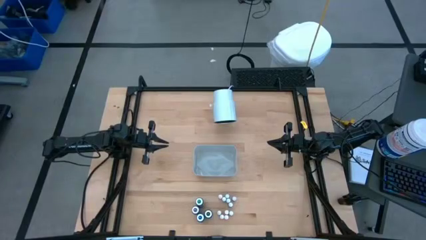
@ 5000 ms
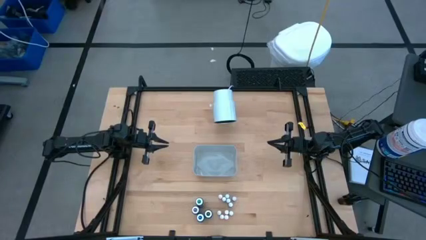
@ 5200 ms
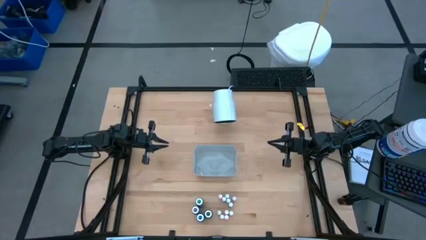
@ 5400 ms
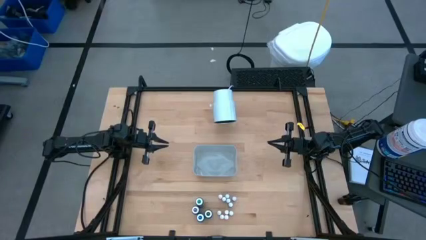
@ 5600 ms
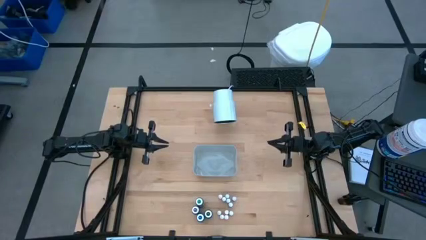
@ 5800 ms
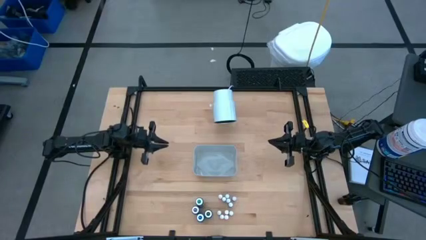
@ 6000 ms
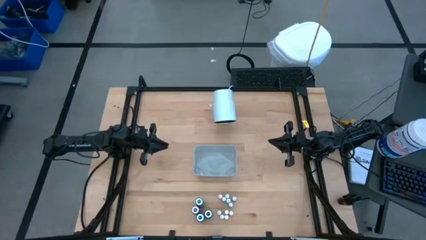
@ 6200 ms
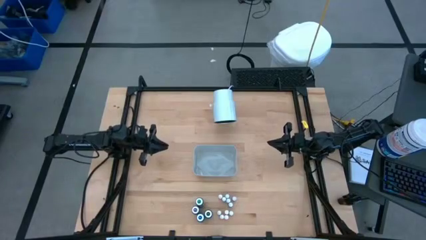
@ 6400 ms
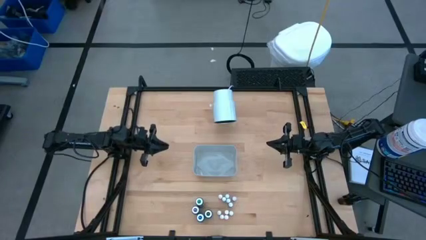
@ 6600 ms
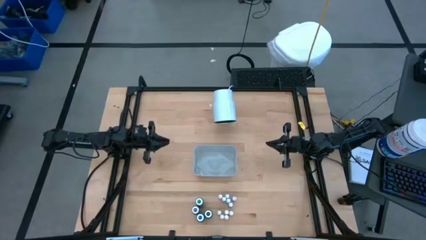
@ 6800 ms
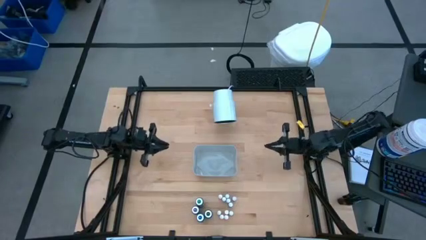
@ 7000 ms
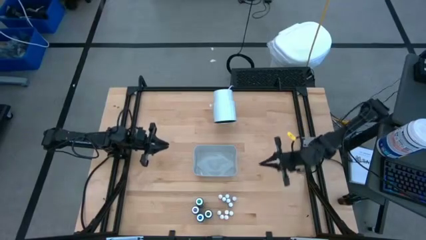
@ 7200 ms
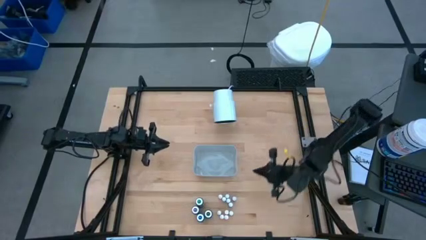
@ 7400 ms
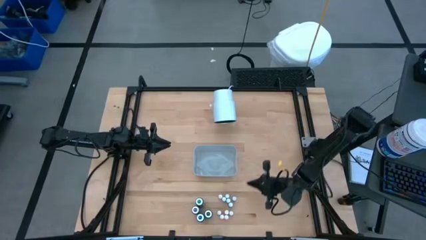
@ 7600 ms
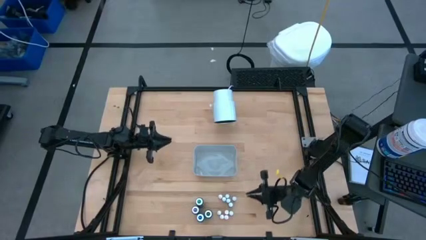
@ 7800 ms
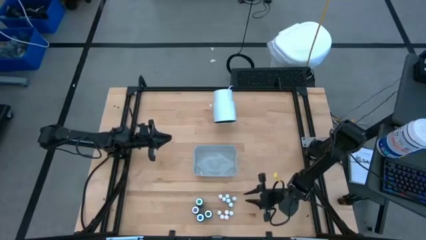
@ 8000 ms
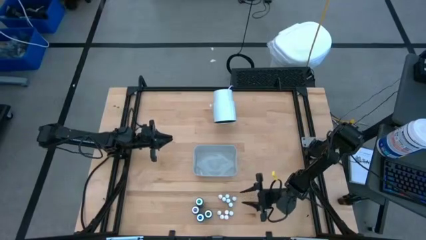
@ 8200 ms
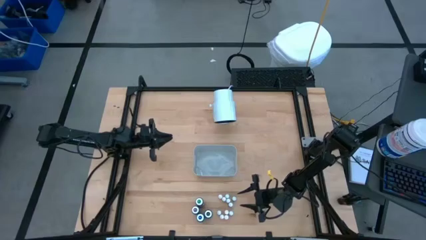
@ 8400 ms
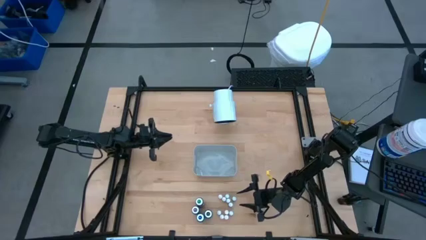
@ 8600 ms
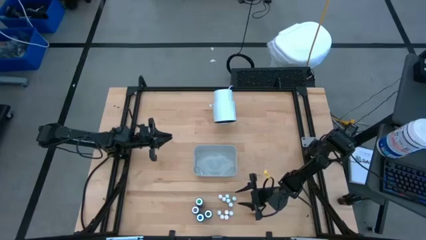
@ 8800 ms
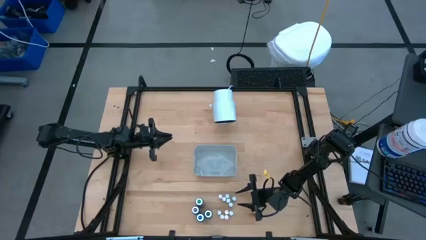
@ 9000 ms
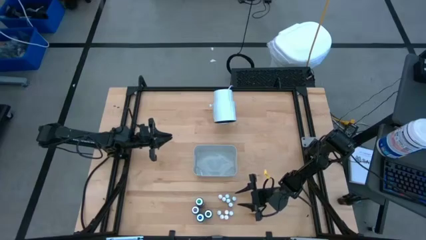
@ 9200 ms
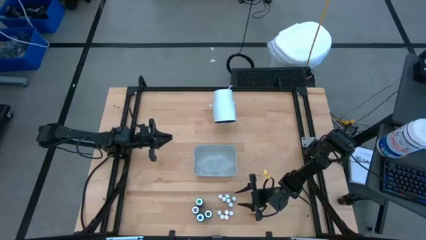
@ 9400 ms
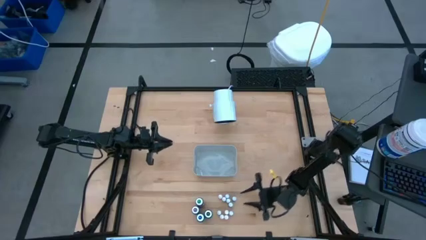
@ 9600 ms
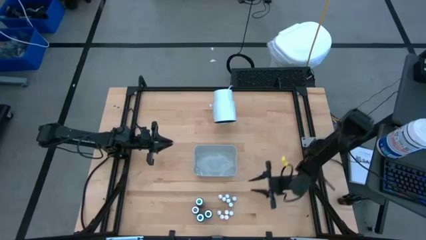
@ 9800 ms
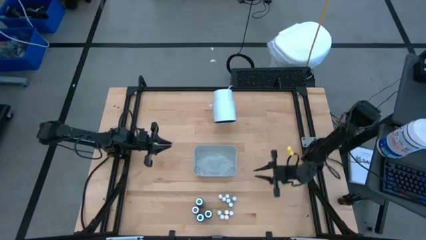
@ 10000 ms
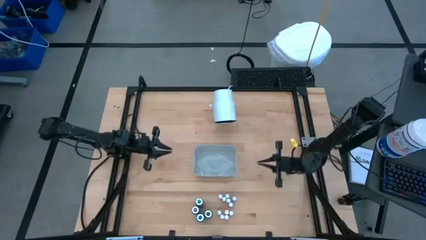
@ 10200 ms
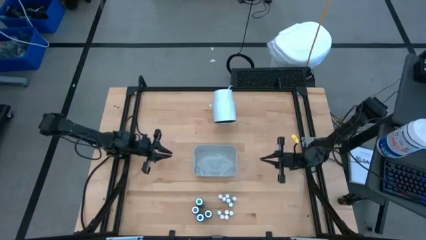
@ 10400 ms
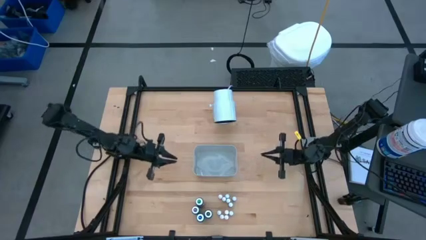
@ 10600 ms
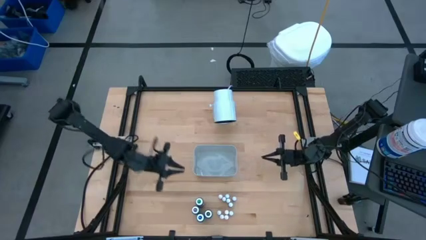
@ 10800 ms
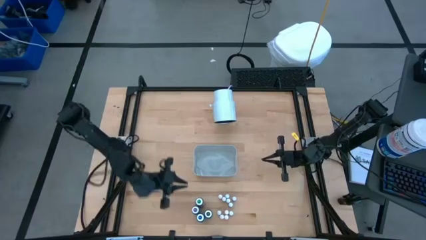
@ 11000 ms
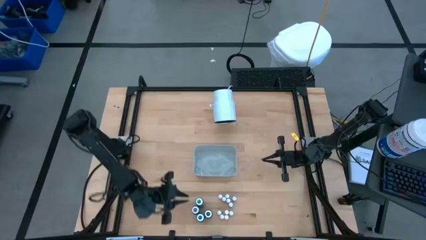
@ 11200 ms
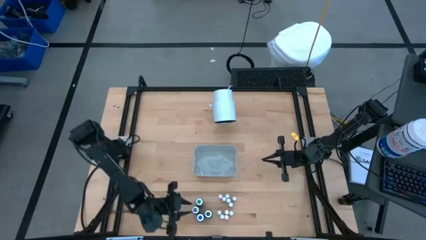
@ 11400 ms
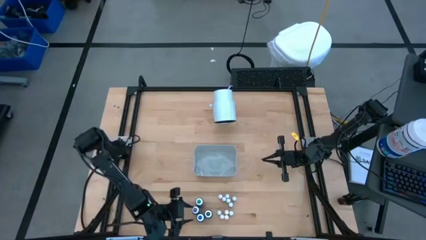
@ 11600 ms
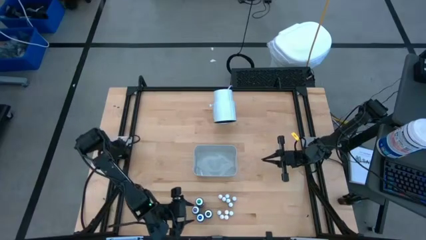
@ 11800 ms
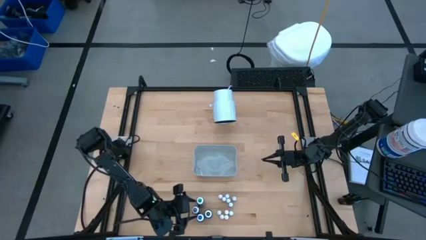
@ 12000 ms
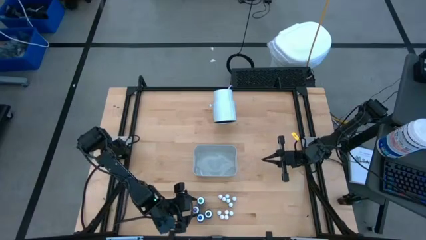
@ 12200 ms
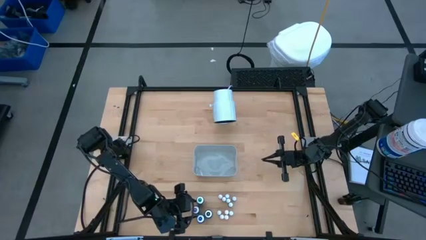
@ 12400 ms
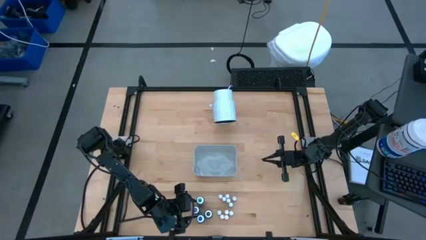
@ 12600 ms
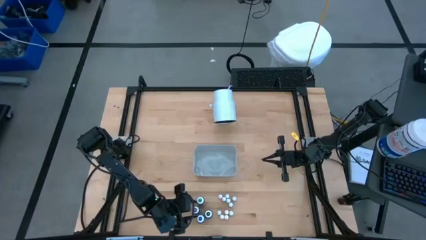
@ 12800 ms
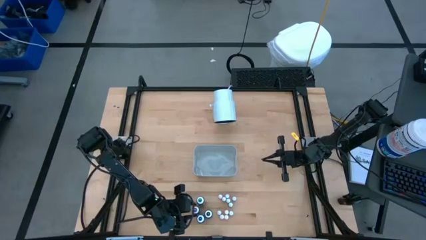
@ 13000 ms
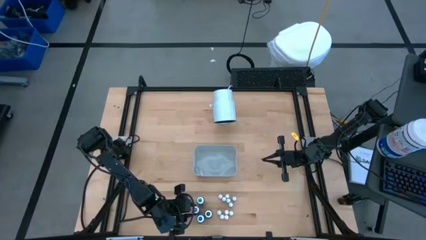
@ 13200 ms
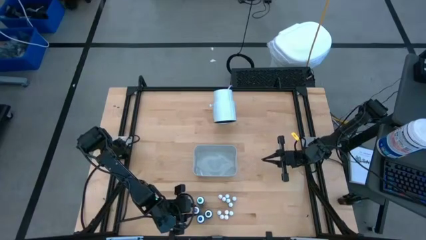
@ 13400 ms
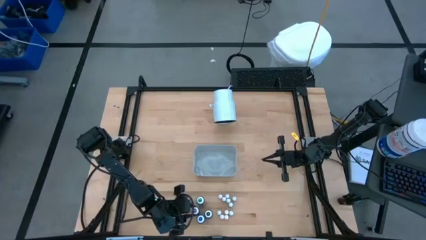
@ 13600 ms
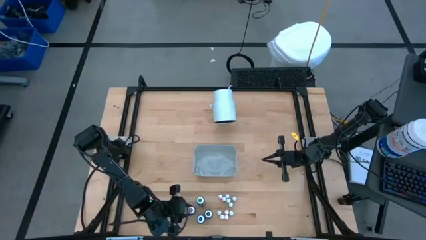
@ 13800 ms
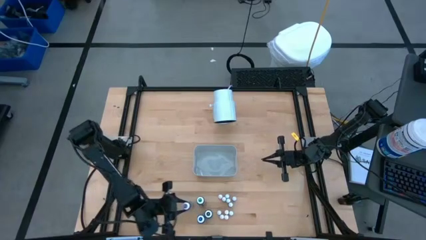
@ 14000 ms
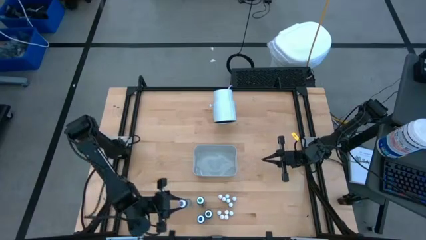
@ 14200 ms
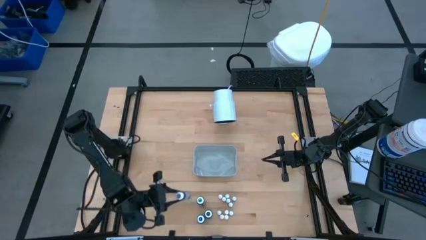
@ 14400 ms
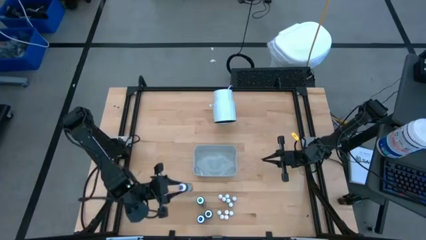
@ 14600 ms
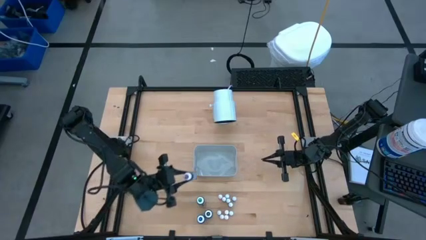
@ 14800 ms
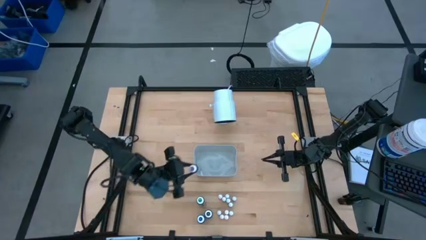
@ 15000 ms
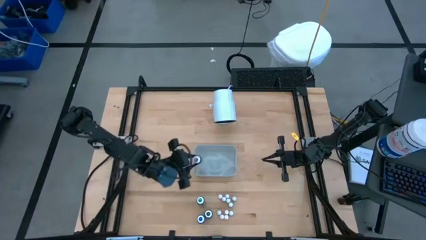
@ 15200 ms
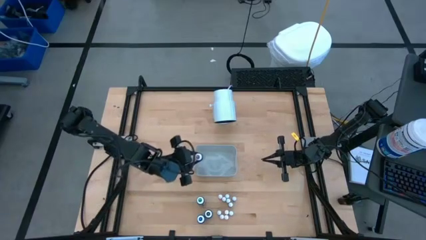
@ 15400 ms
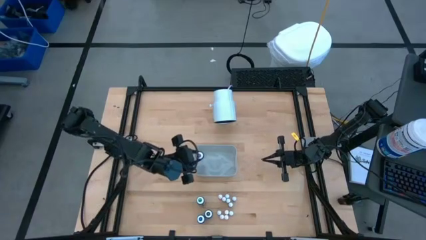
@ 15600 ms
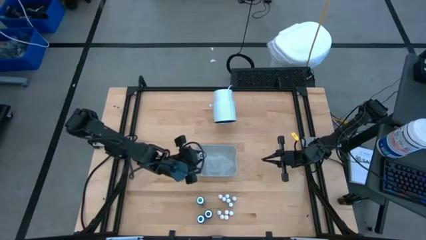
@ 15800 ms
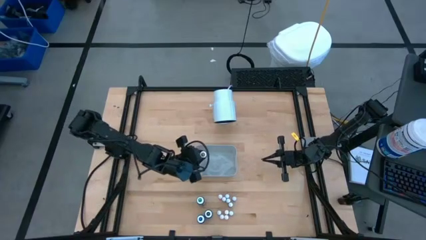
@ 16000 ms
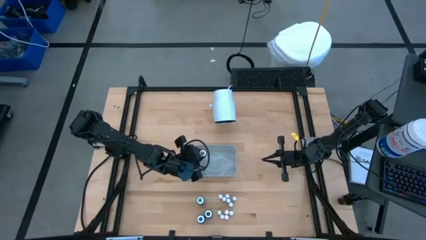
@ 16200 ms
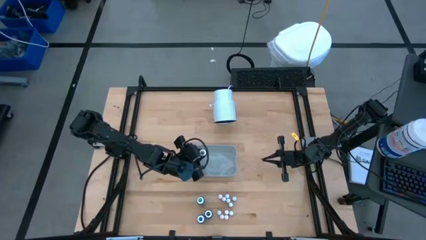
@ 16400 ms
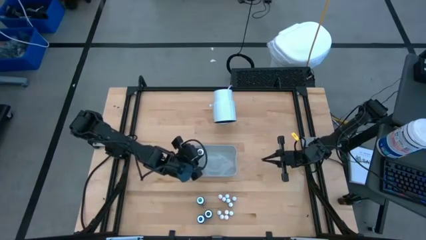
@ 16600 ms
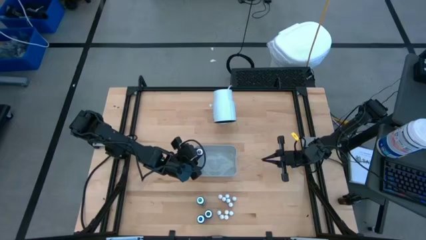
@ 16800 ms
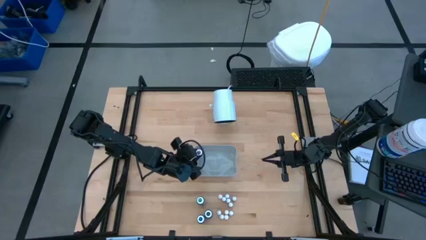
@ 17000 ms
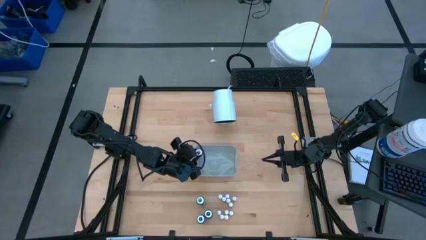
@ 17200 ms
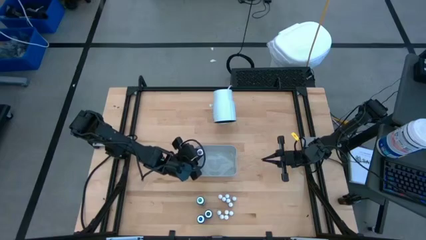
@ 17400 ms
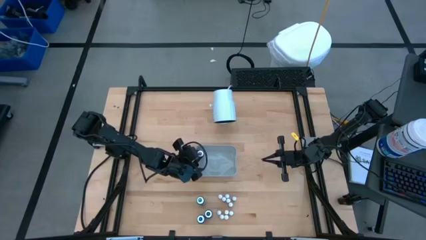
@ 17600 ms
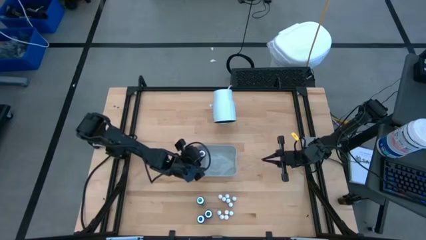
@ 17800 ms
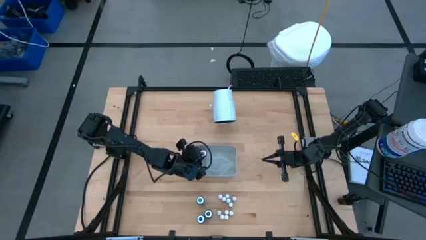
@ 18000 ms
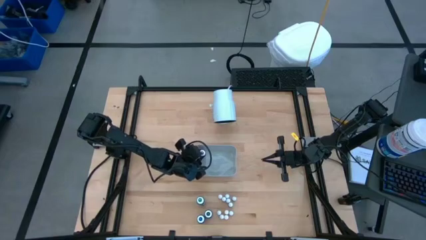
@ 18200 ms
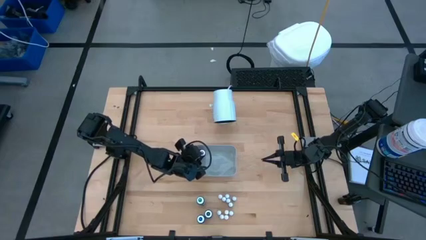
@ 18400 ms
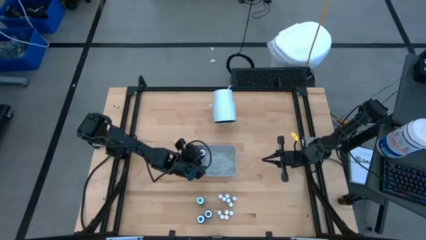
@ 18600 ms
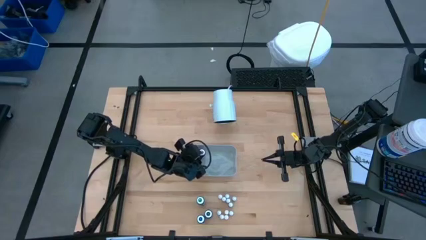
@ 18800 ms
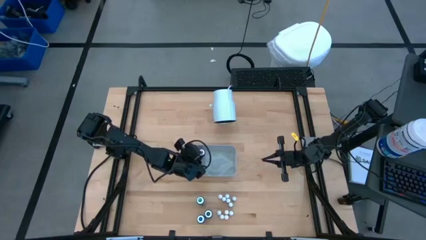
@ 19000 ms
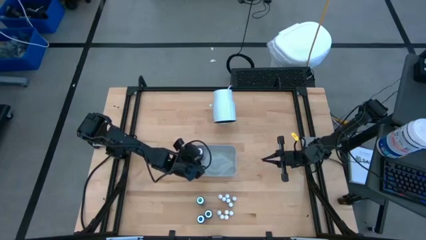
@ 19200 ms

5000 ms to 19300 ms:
Task: Pick & Place food coloring
Put the large purple food coloring bottle into the gray bin
